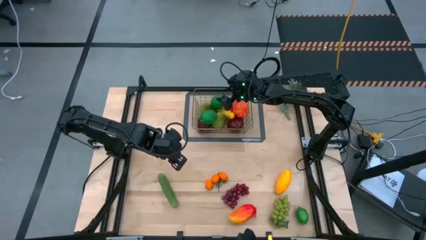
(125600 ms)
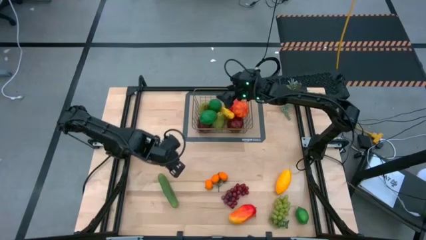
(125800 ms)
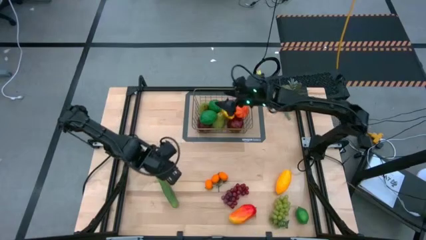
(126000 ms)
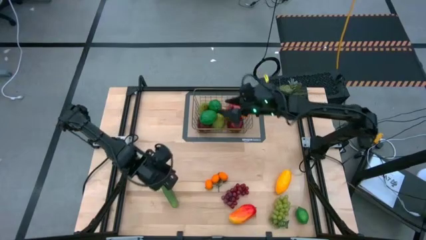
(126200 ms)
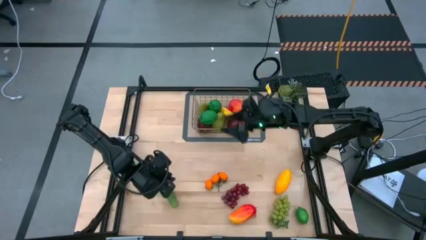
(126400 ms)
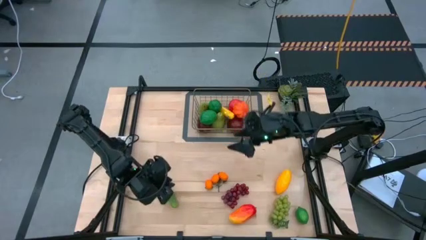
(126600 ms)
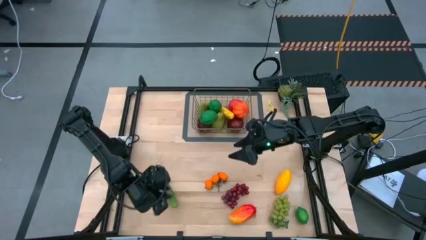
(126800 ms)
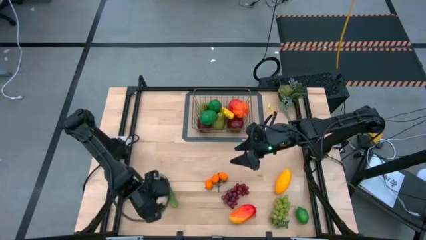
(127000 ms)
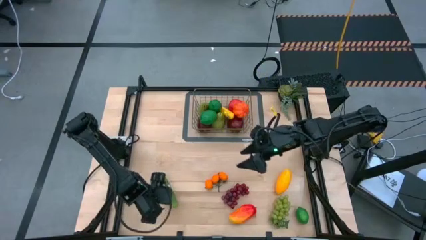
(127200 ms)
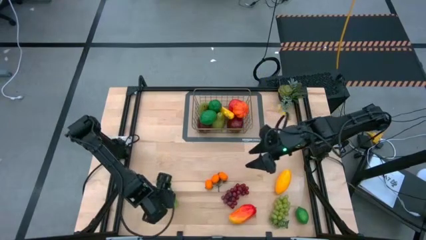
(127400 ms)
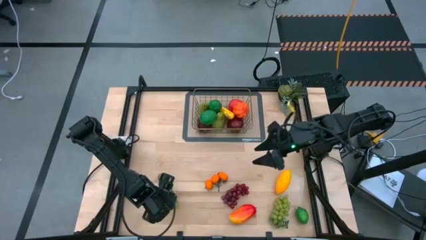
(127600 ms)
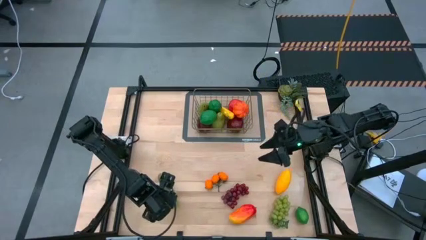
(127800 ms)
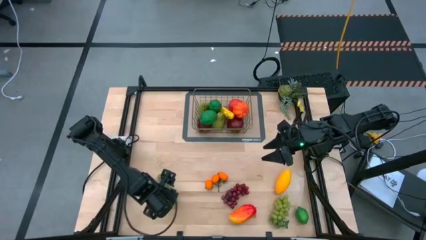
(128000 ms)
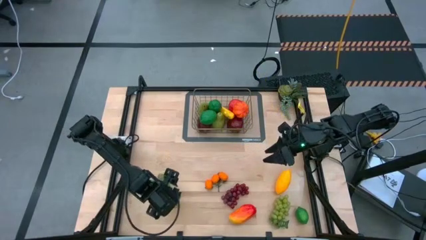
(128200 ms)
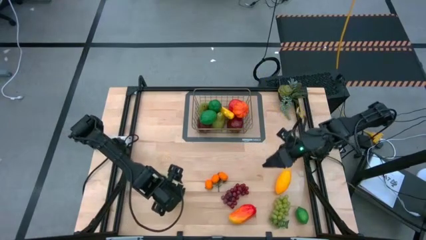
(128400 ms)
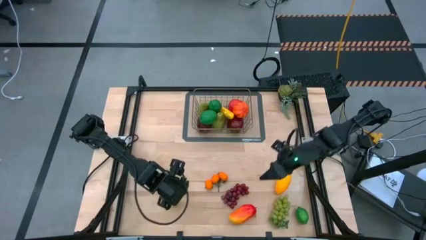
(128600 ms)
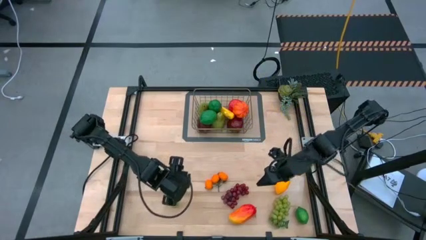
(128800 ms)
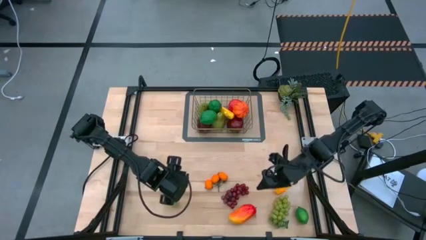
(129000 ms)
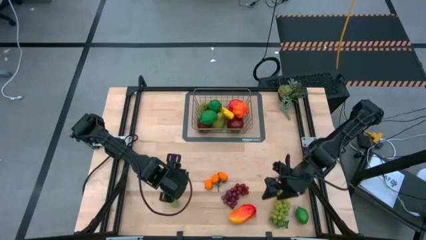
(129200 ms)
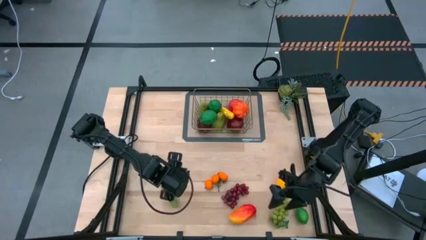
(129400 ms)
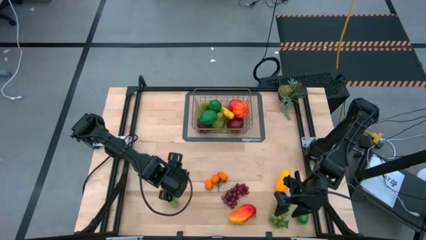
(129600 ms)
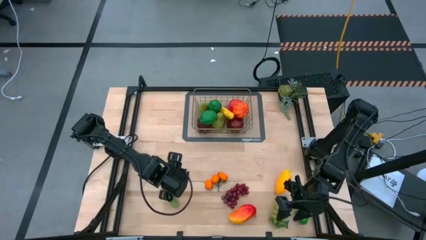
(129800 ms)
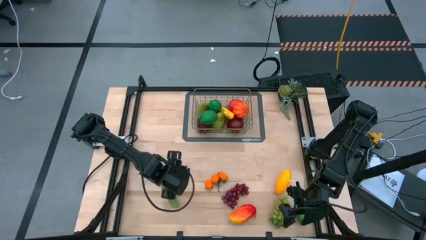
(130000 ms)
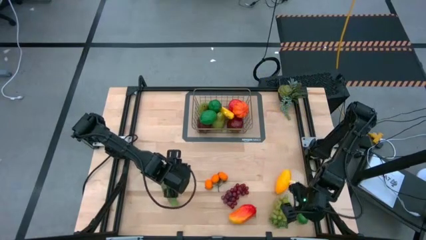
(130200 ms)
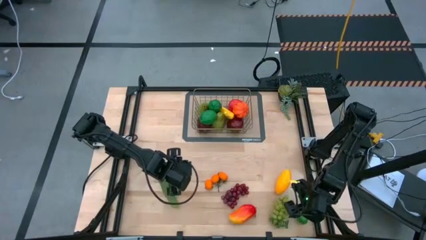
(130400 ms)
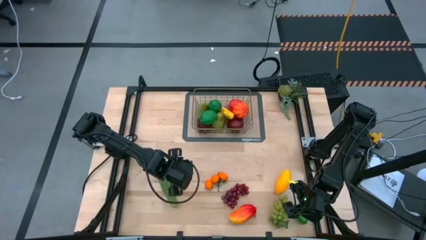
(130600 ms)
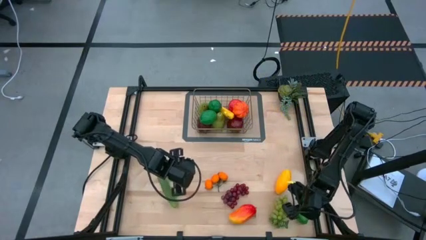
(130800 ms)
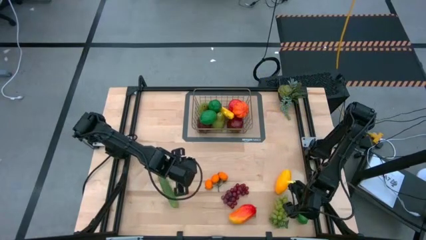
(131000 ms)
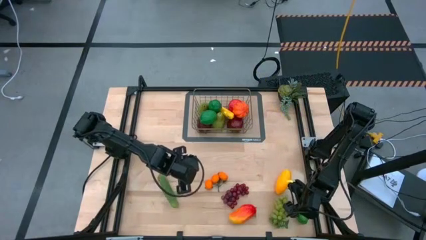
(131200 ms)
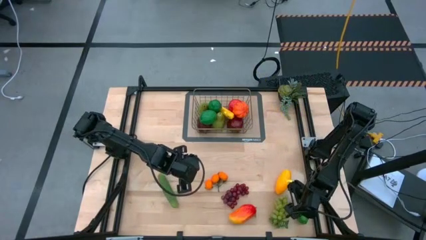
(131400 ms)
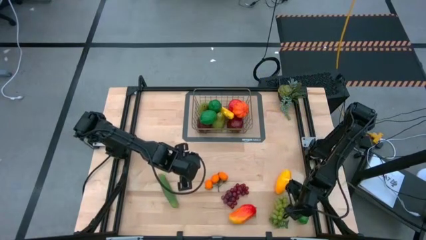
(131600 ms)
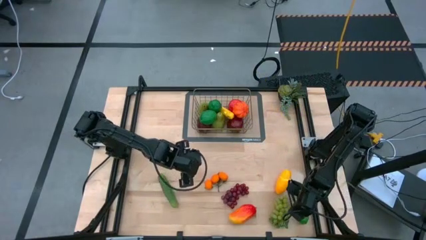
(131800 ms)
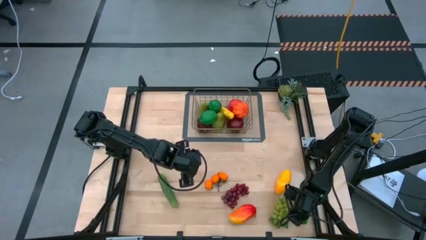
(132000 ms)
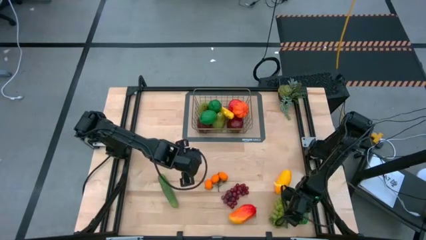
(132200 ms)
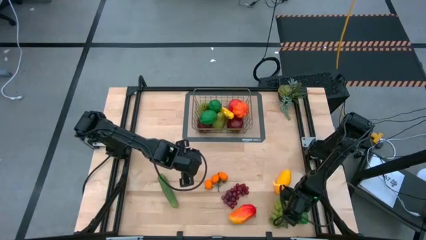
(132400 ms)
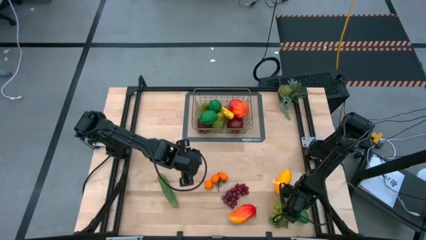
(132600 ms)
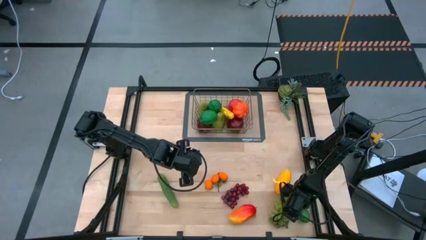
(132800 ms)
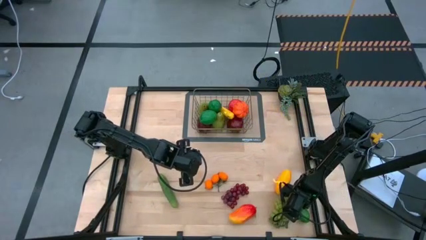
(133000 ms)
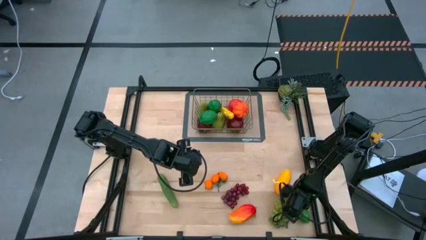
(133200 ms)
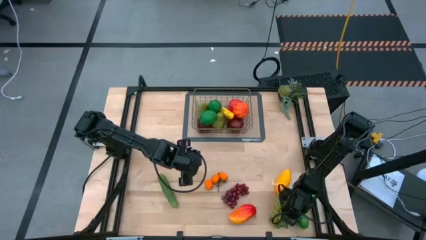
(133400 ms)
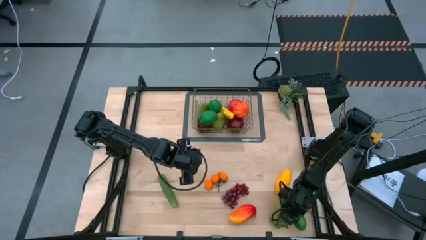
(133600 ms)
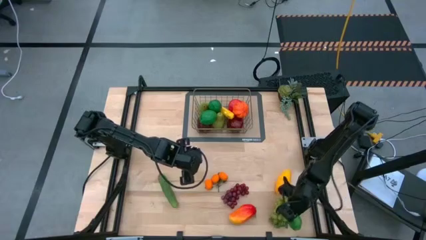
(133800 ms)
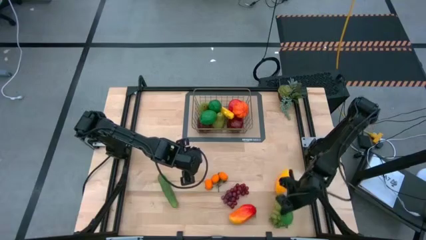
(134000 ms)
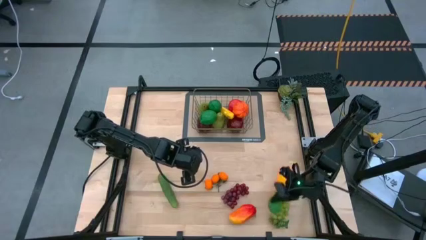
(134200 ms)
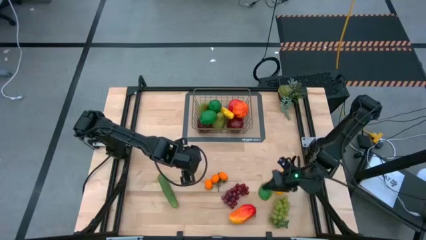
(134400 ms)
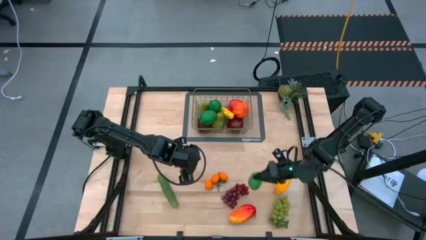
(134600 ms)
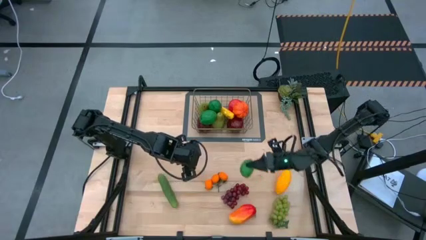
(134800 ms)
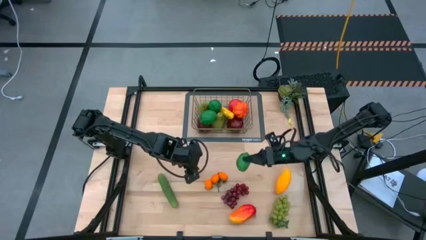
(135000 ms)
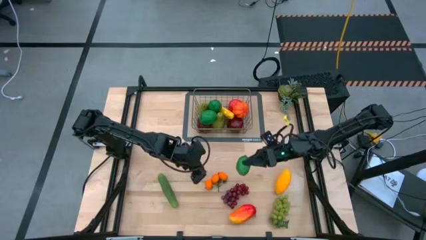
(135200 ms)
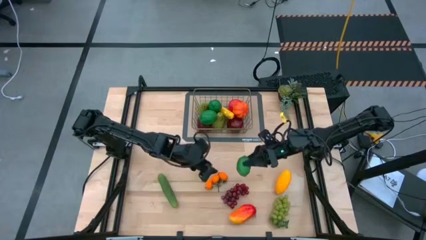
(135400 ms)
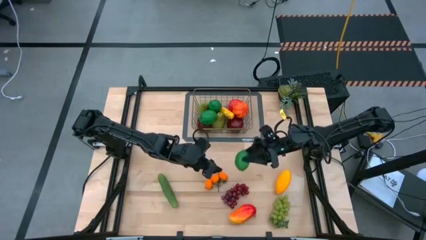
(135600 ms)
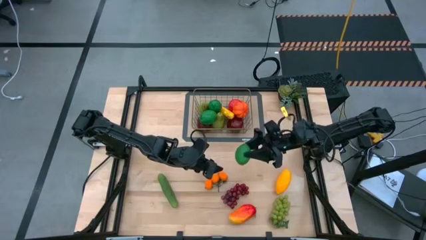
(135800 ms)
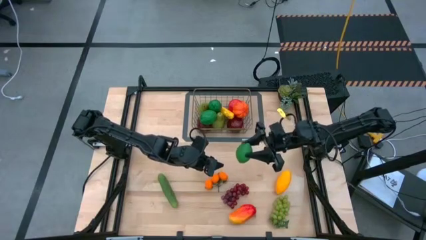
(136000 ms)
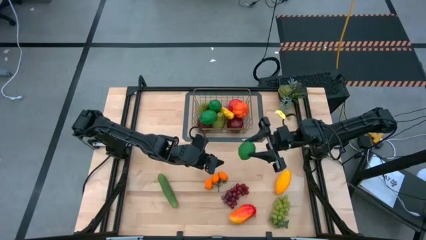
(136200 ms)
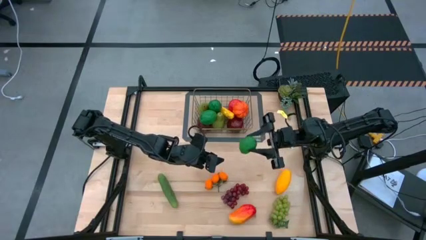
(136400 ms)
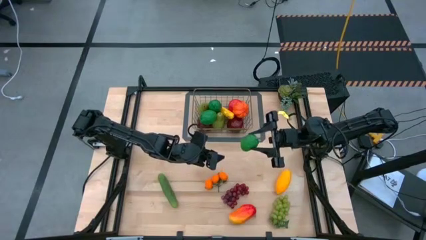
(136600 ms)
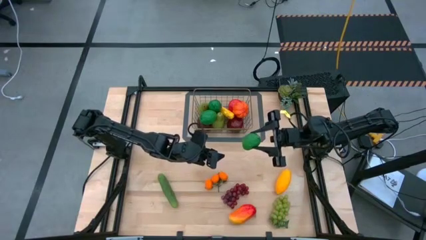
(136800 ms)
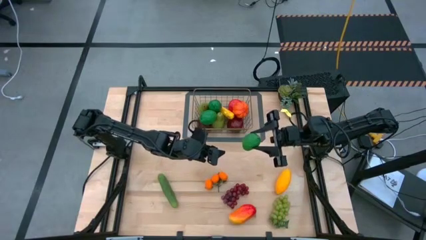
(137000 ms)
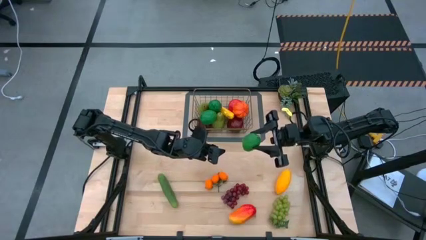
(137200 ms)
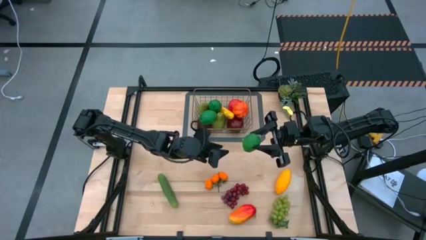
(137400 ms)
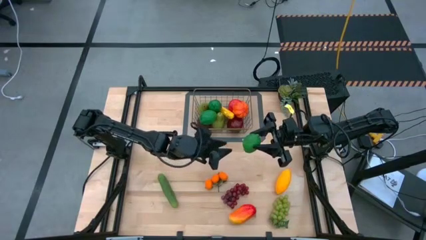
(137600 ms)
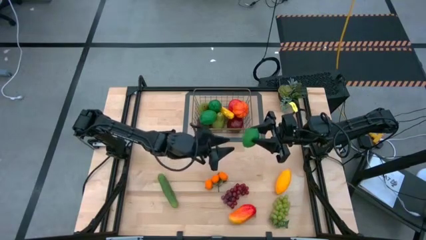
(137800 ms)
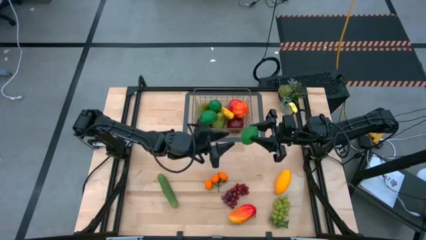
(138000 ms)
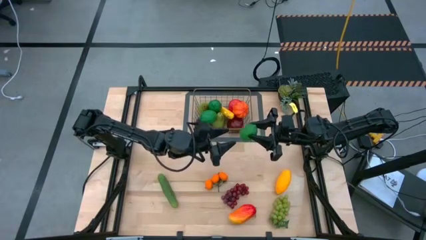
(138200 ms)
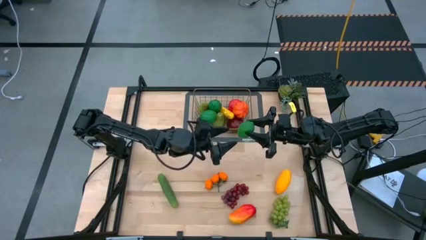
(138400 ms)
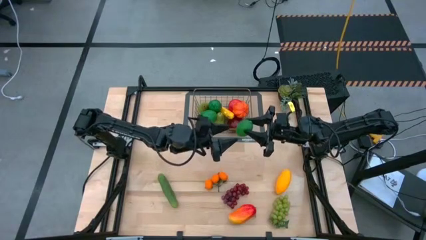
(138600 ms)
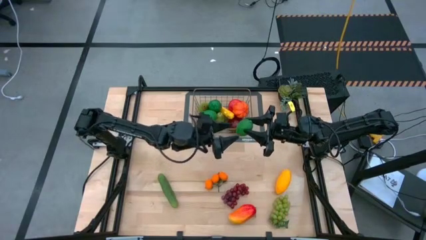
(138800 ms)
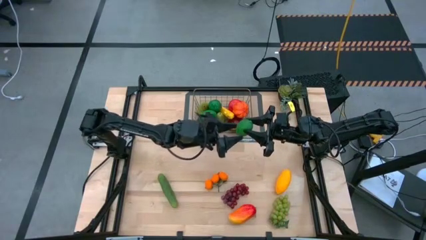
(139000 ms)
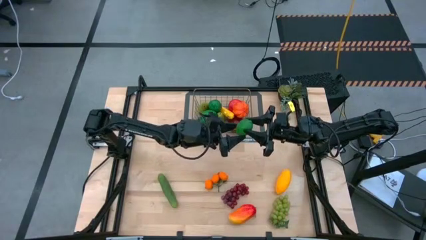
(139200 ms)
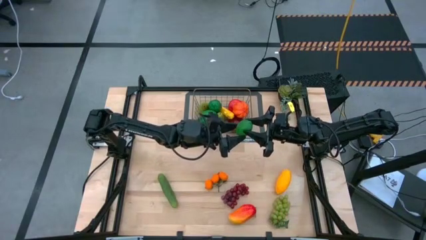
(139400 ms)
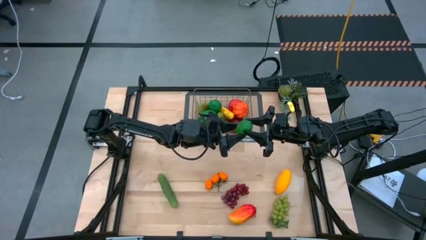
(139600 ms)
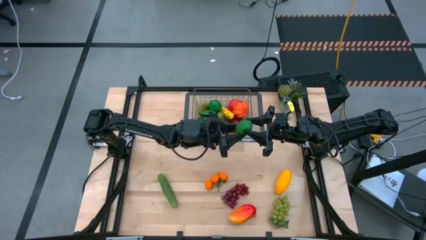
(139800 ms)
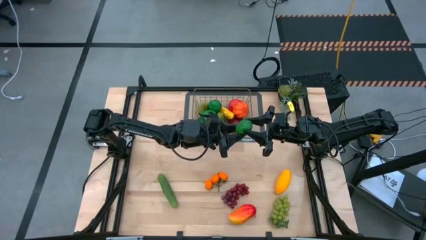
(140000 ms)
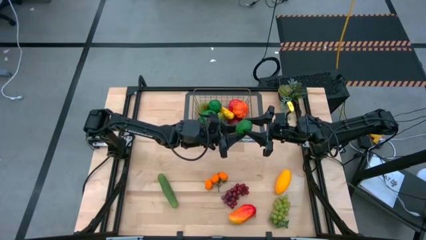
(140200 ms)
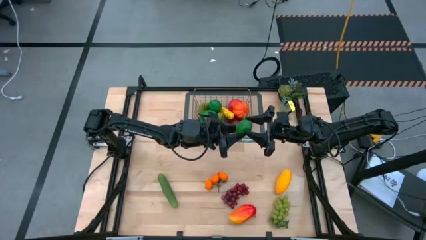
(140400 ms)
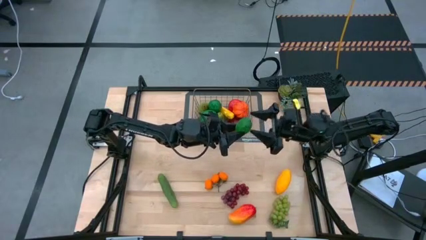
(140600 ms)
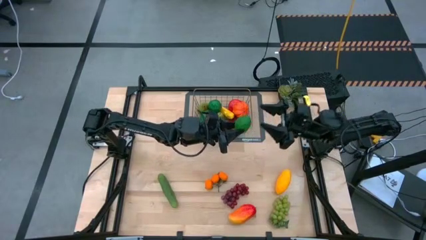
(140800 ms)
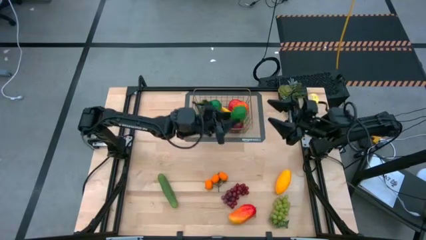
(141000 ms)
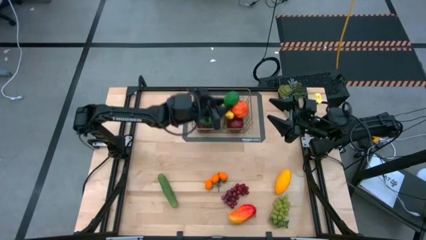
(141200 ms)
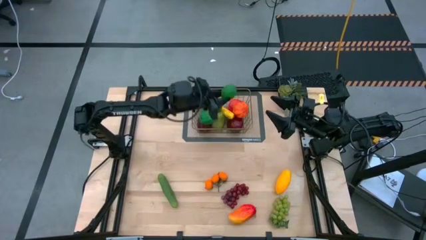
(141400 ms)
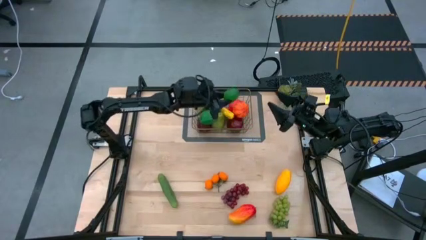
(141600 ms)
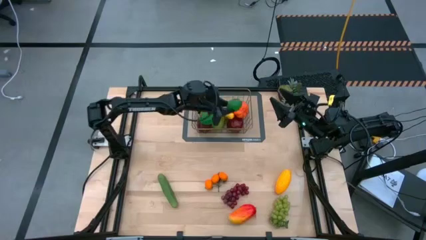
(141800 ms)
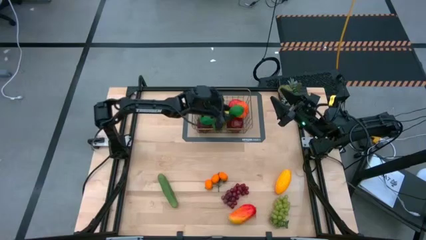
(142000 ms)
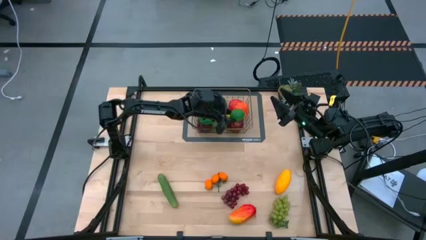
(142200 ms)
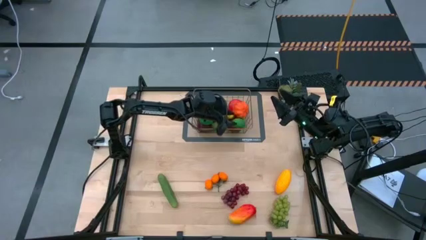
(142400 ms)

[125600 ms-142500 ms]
Task: Build produce basket
Put the green lime into the brown wire basket
